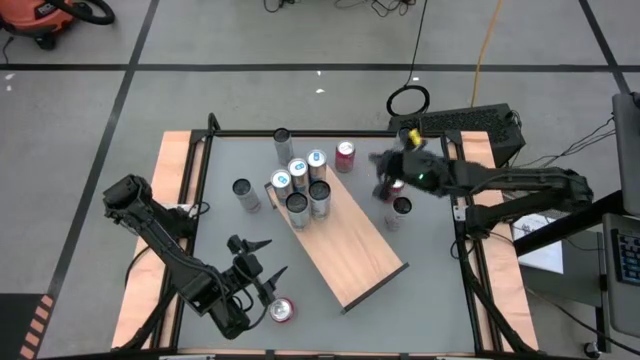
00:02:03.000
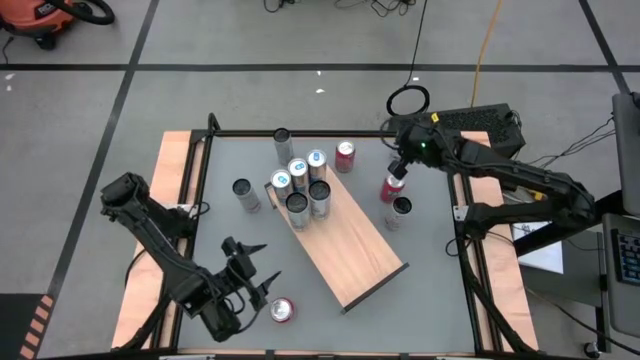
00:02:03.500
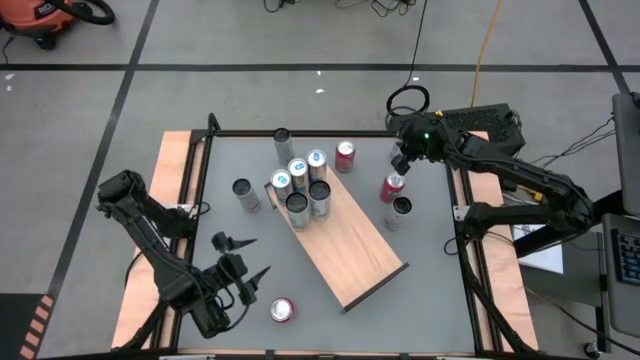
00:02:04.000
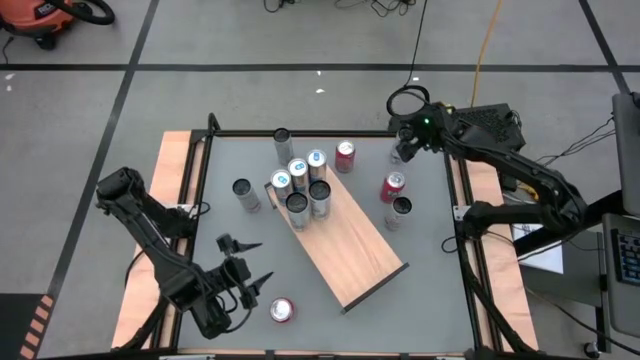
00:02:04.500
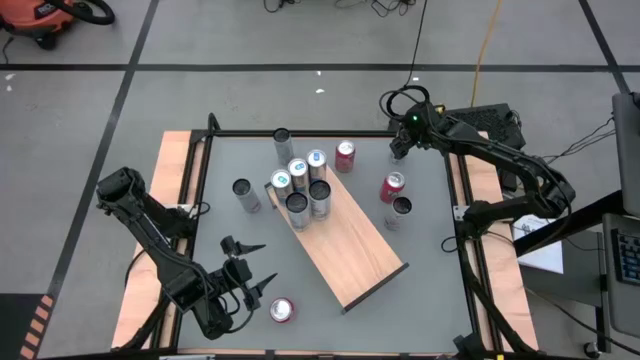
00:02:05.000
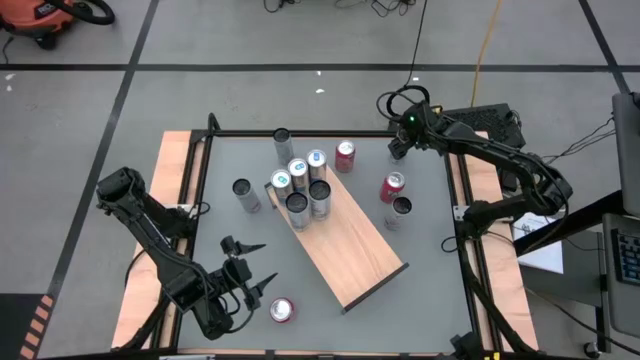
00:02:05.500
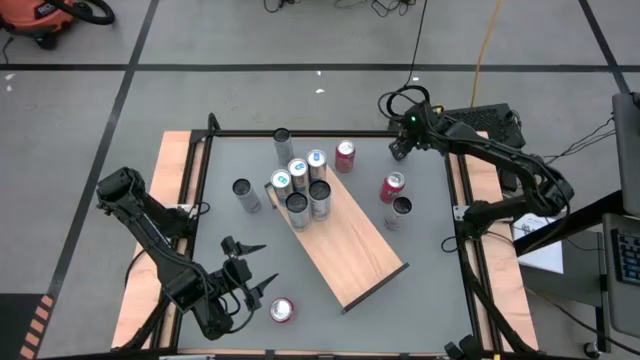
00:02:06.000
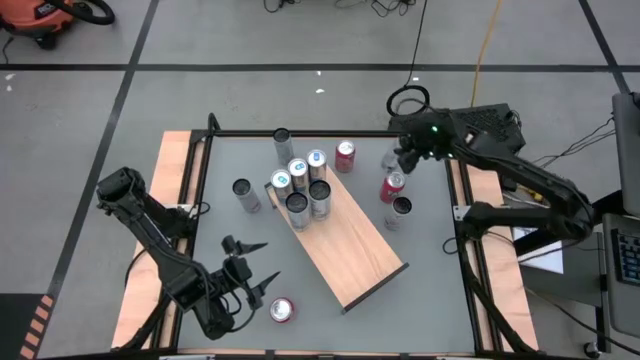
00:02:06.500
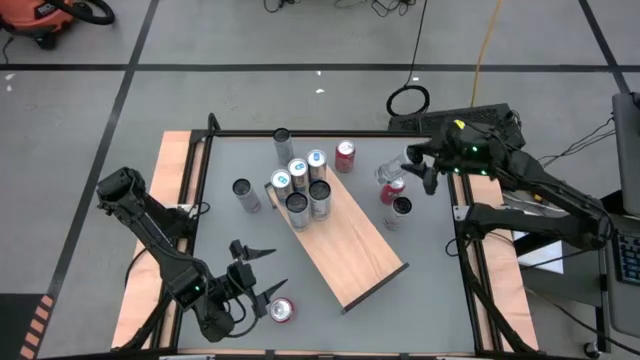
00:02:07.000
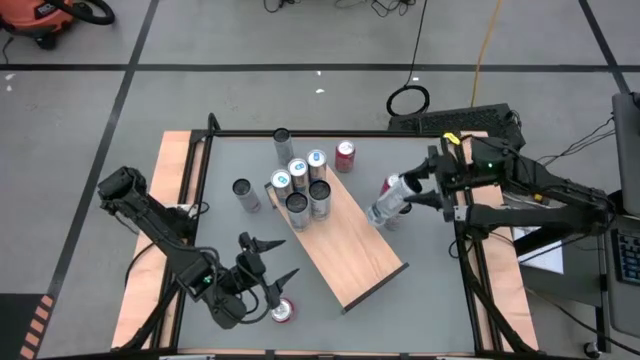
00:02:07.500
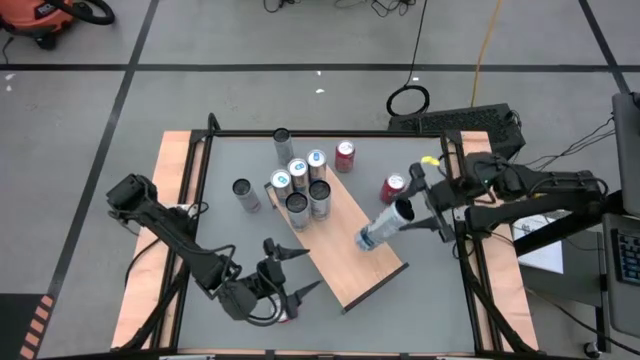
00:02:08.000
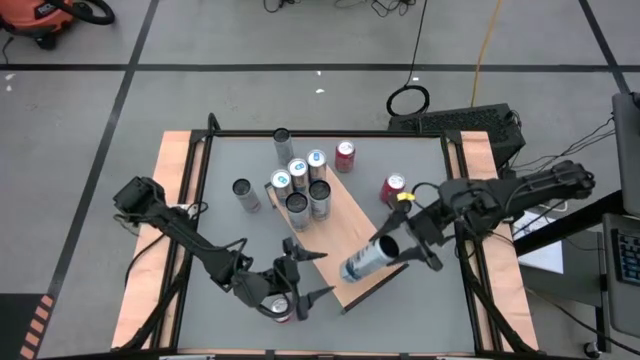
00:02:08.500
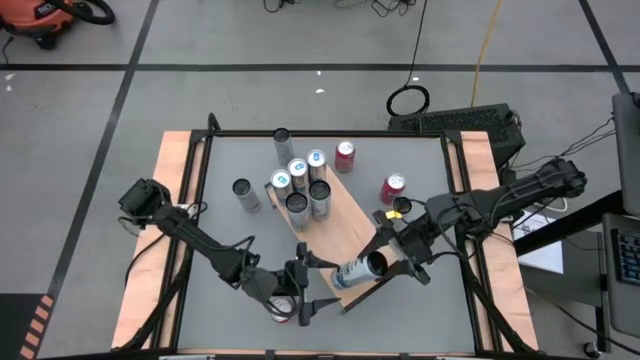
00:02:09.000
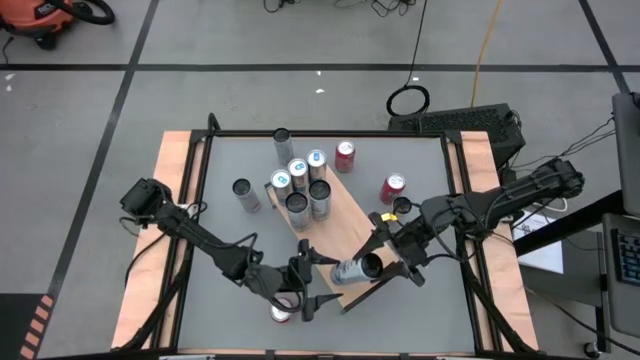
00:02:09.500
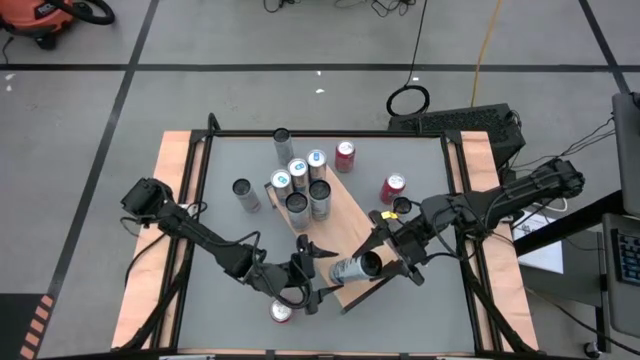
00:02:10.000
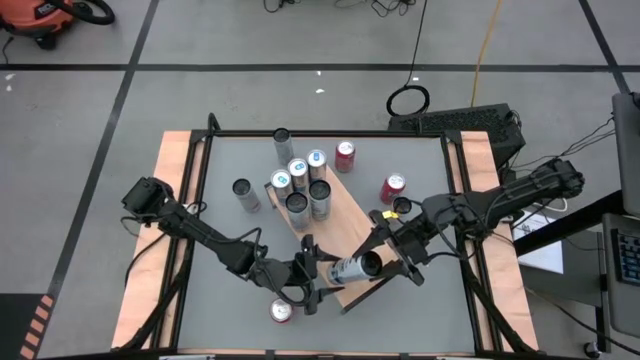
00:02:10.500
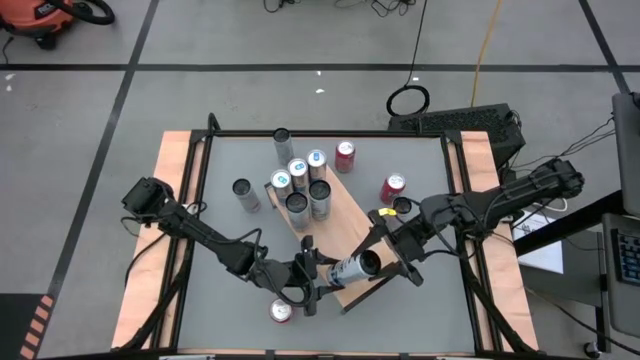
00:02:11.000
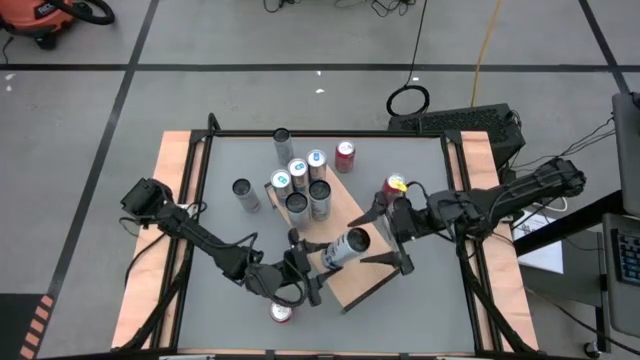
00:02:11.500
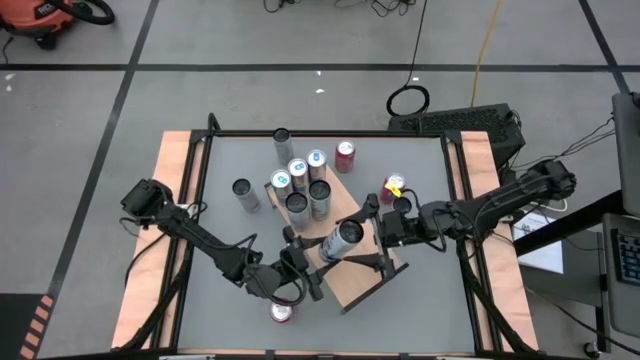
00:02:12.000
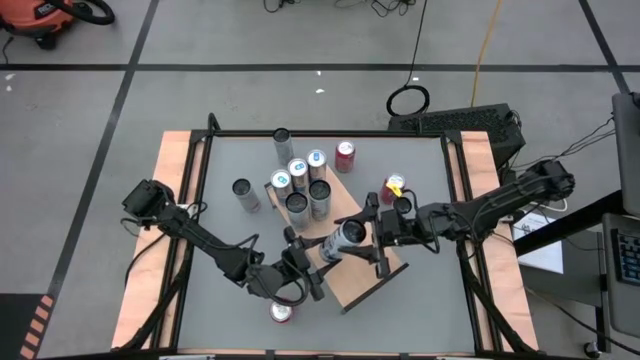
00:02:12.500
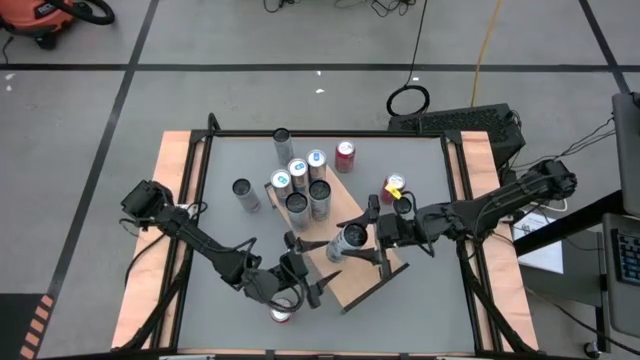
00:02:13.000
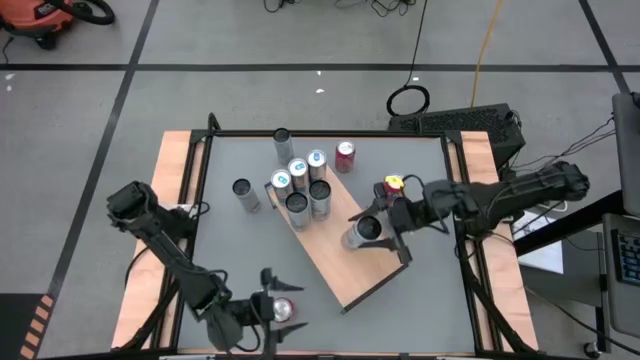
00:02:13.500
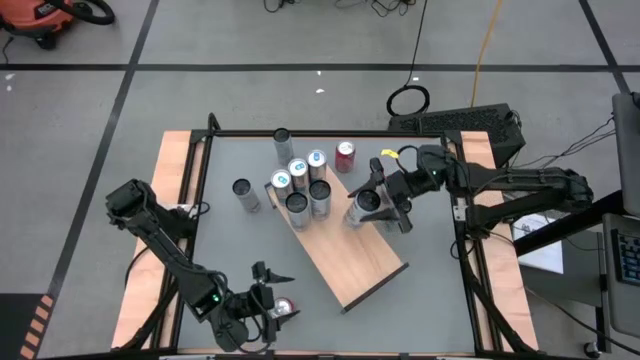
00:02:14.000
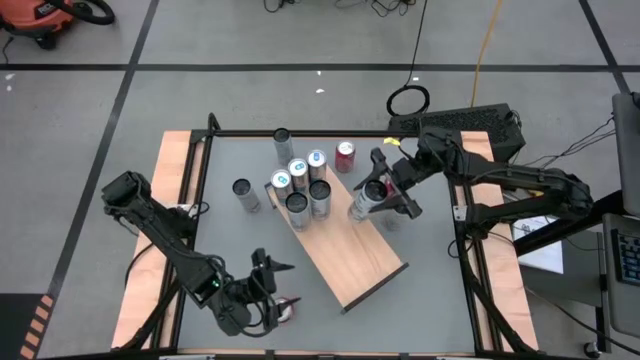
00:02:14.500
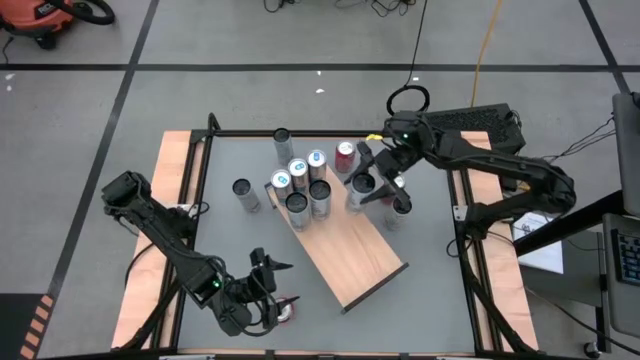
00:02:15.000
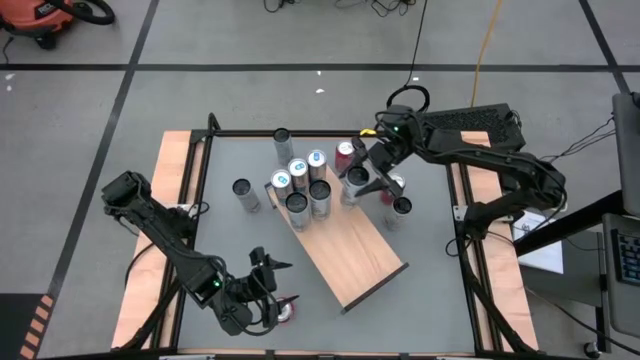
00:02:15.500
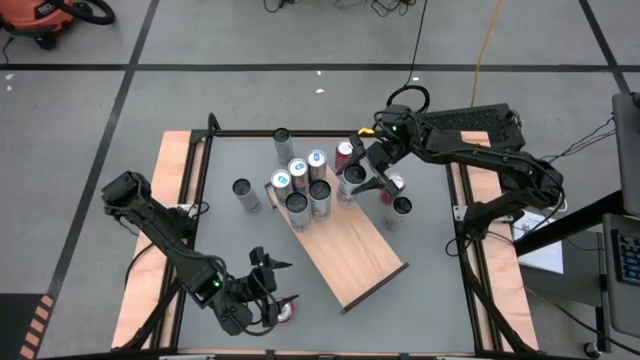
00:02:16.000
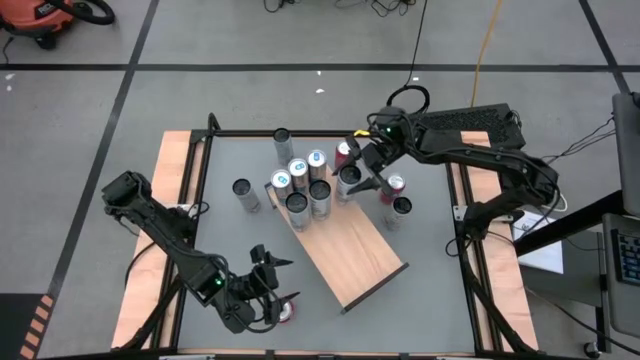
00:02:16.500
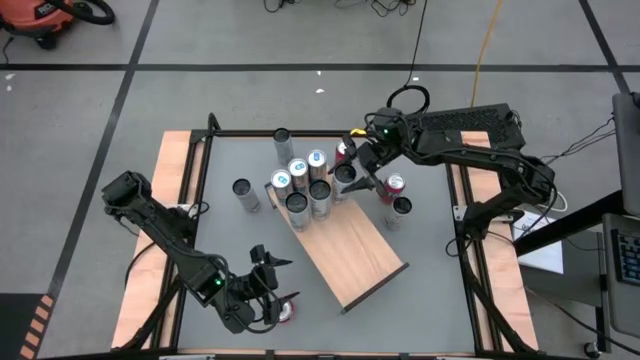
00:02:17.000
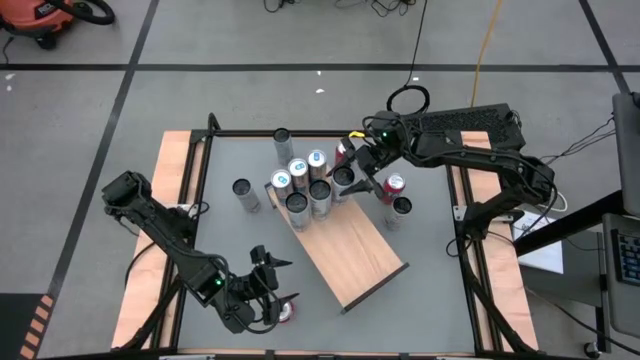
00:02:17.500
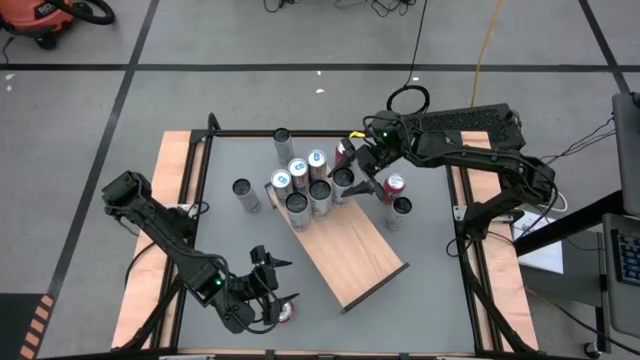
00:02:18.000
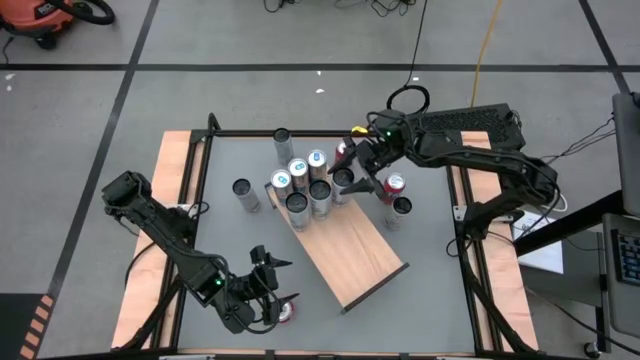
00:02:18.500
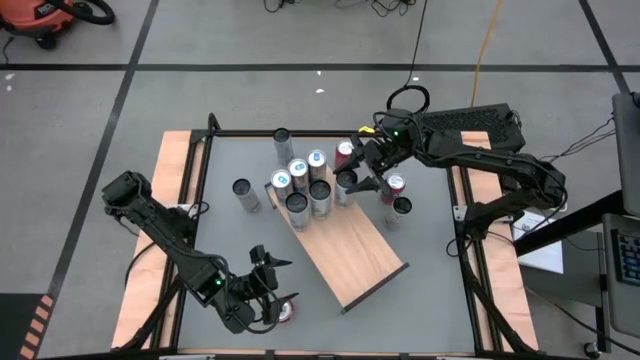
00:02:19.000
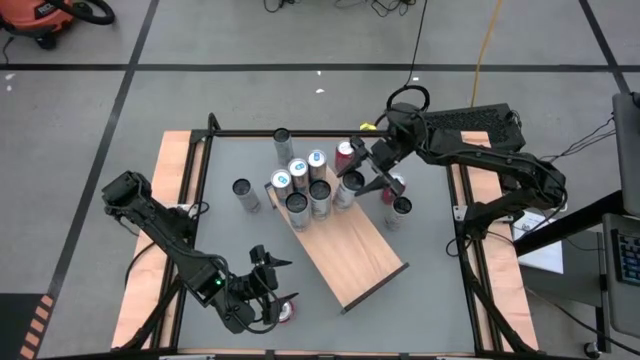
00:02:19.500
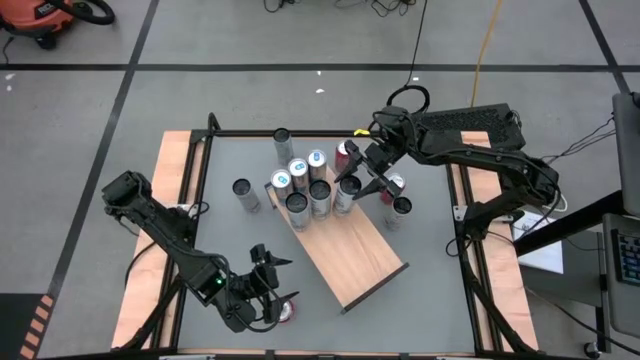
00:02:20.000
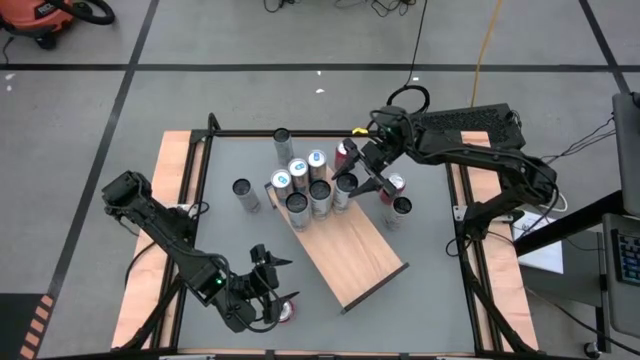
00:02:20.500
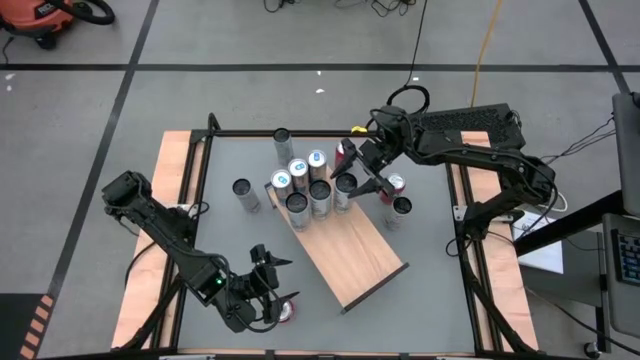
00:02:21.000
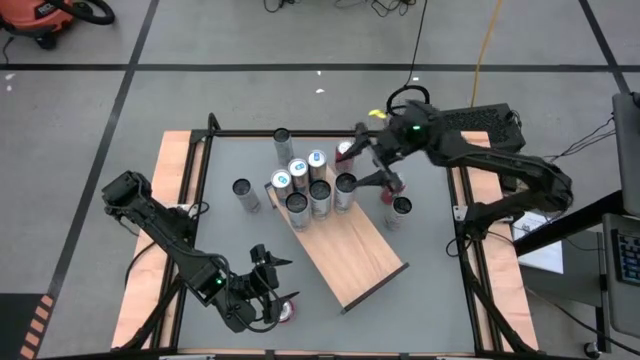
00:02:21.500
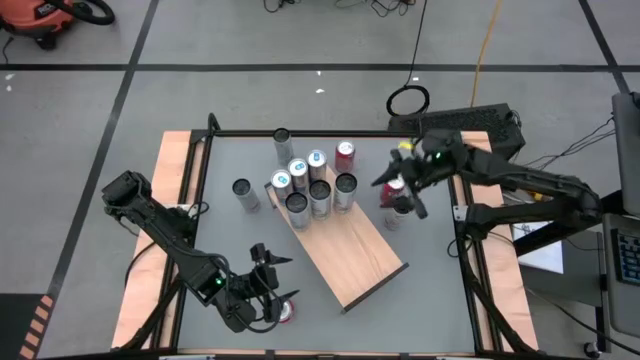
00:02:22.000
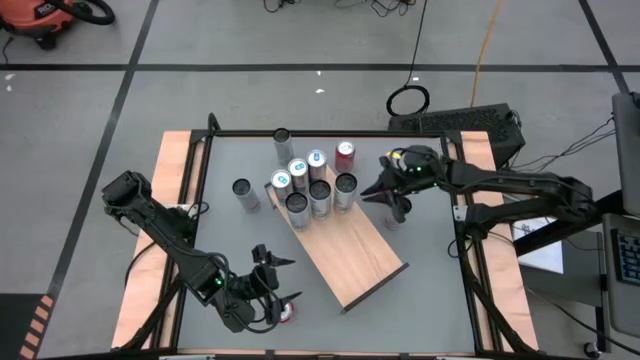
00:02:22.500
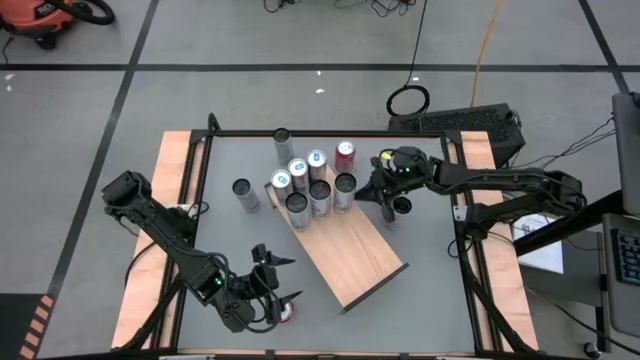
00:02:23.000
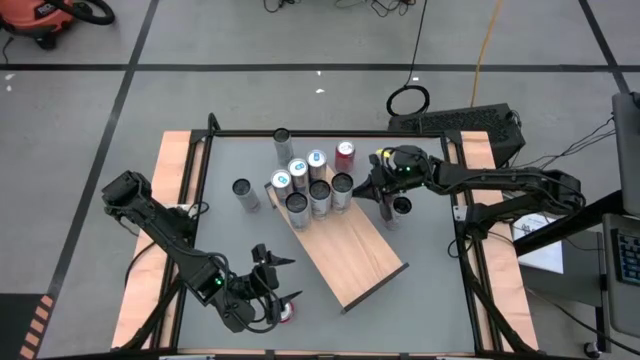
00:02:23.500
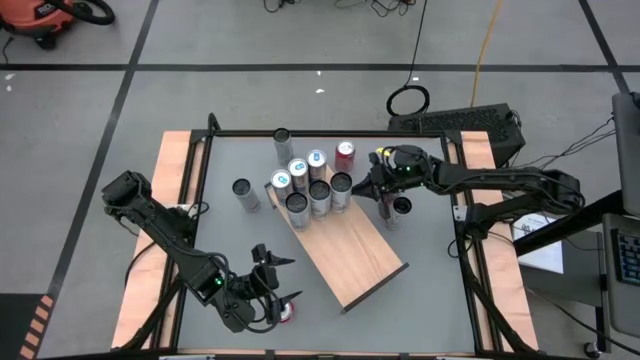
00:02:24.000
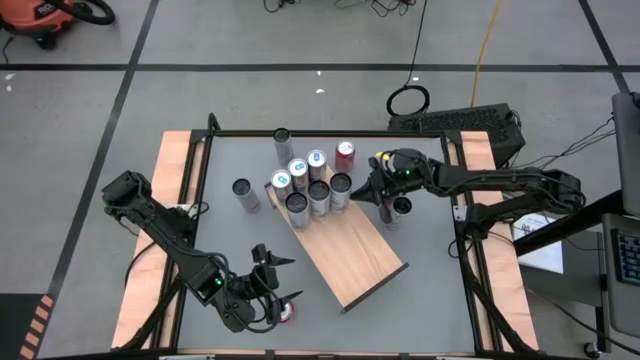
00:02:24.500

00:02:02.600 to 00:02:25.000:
Task: Place canned beverage on shelf
Put the white soda can on the shelf aligned with the other white soda cans
